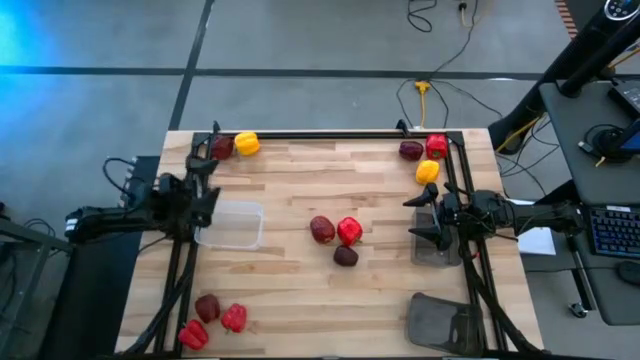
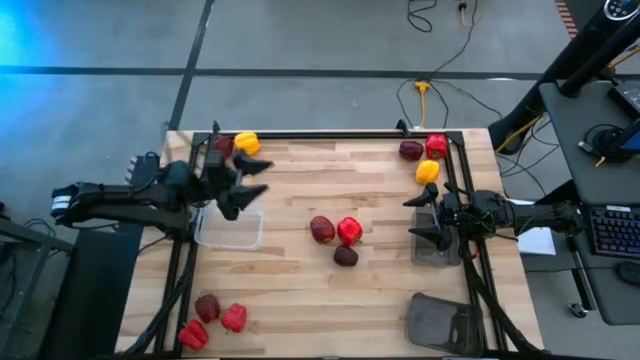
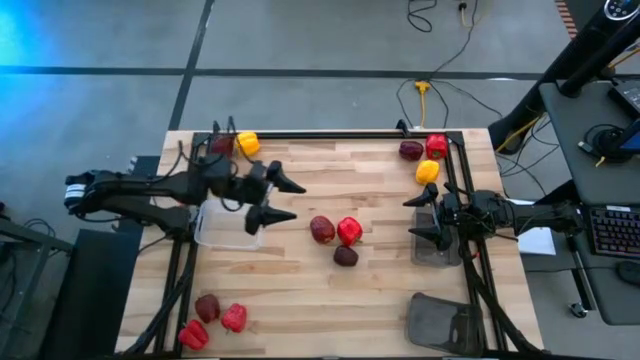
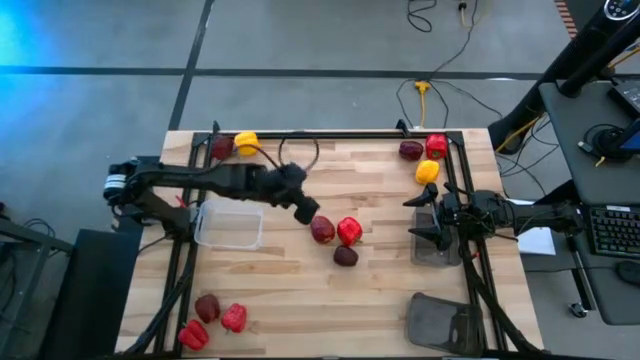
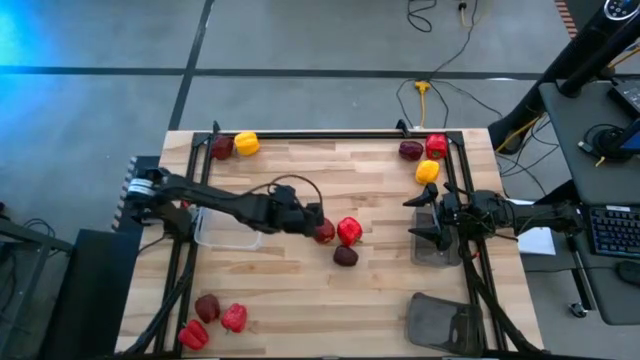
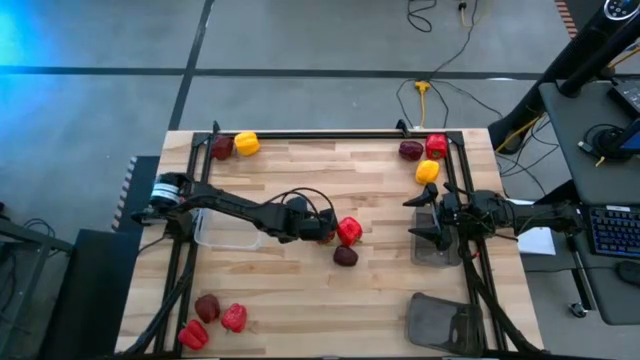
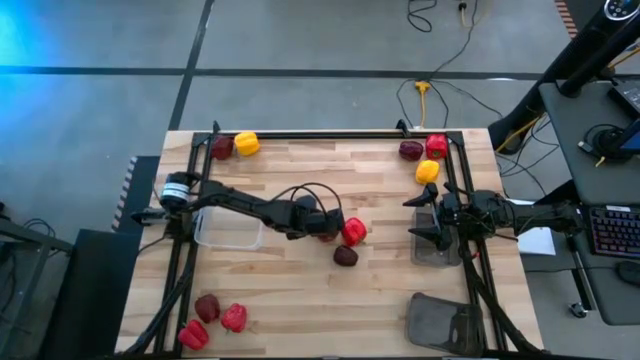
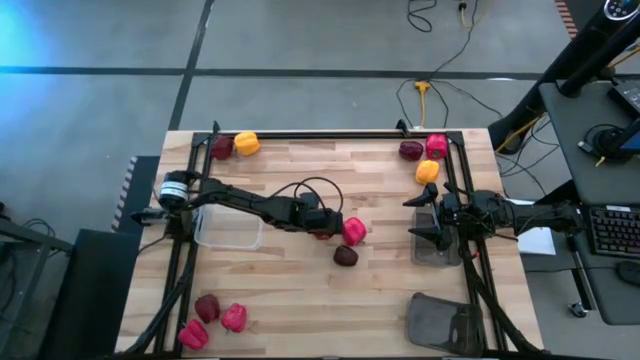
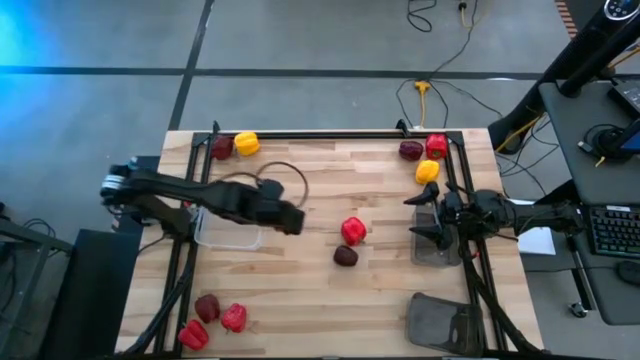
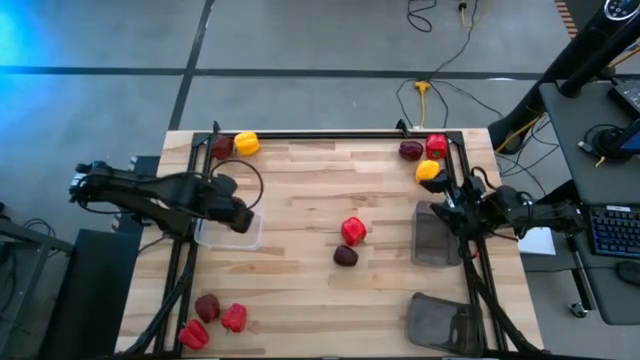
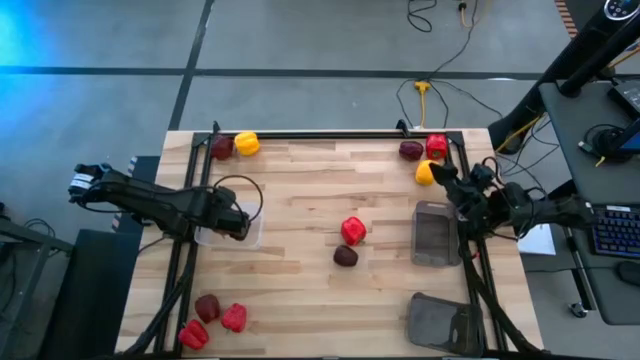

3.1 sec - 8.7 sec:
Task: Sort produce into baskets
Put the center red apple in the transparent bin

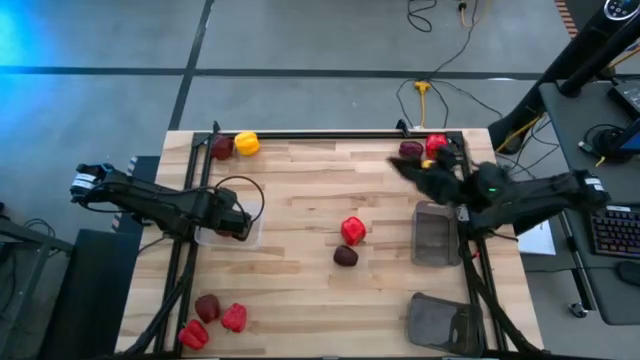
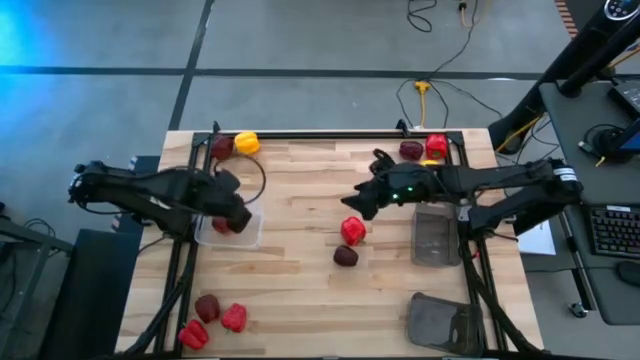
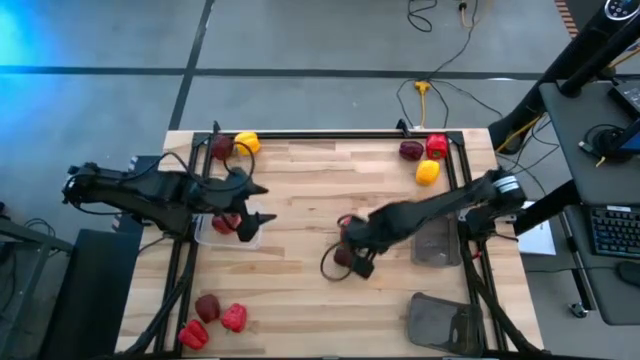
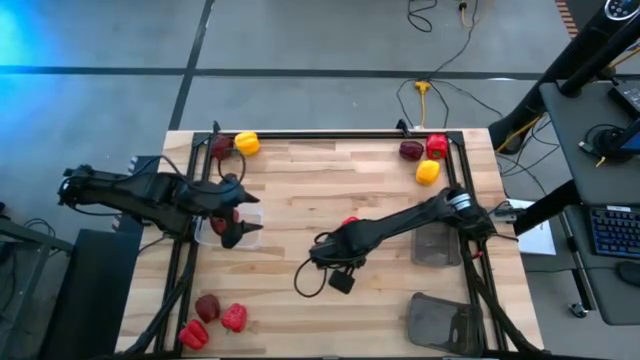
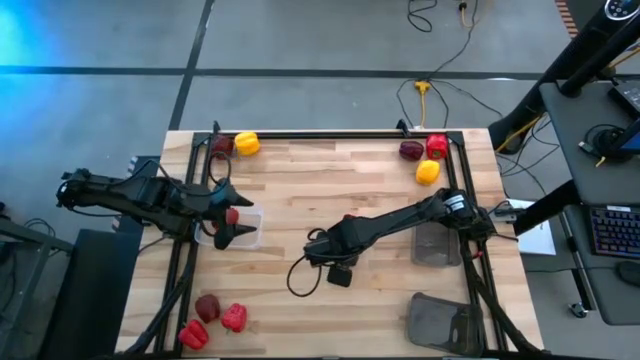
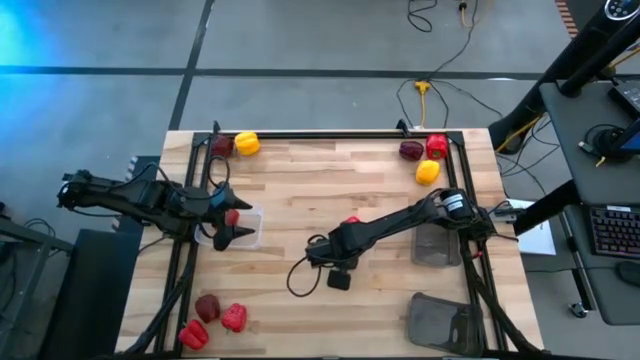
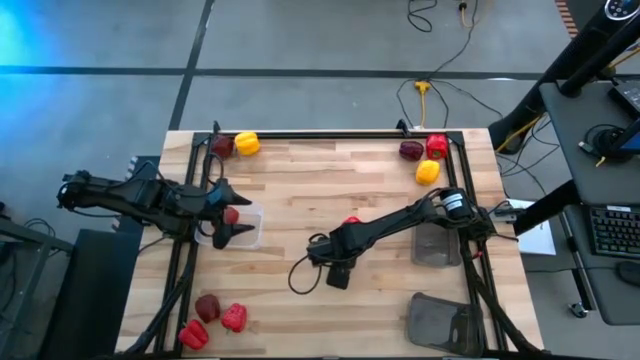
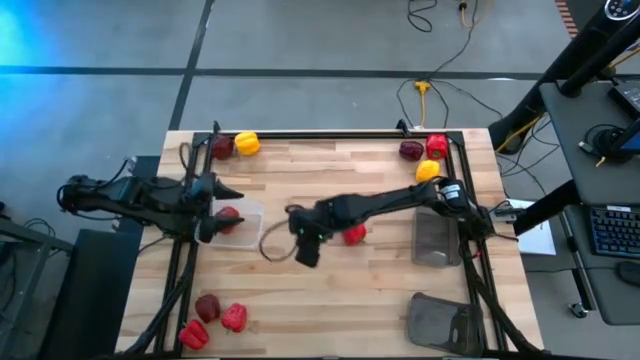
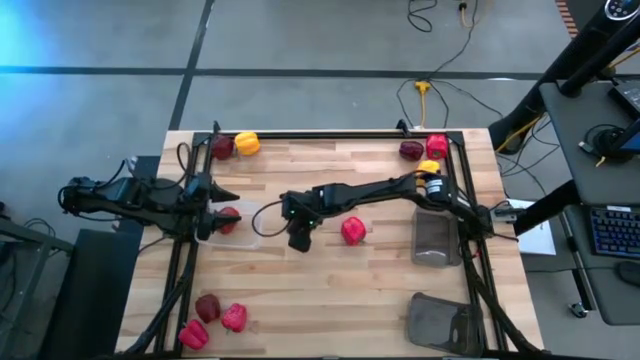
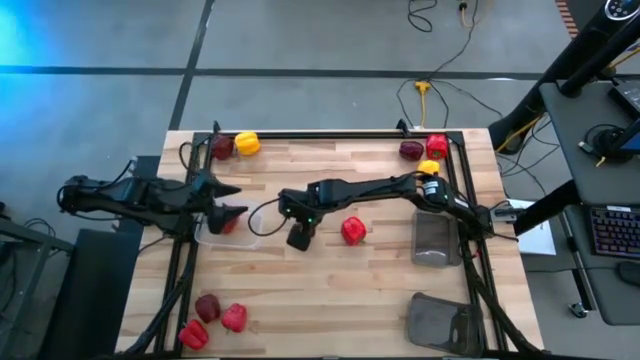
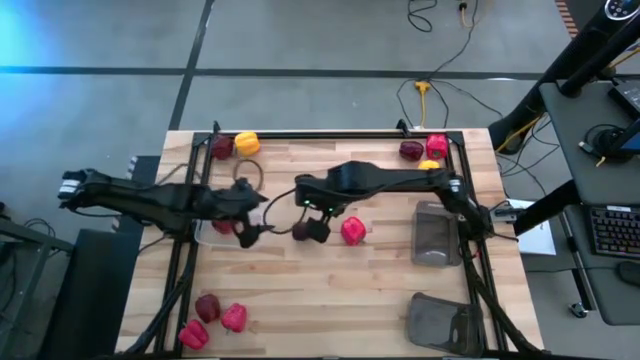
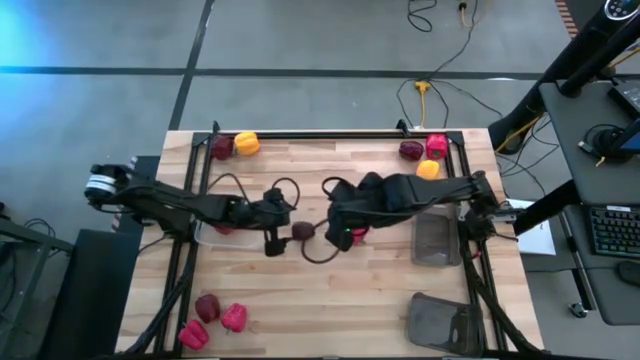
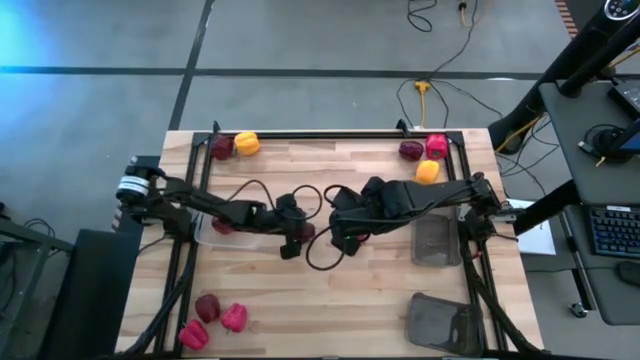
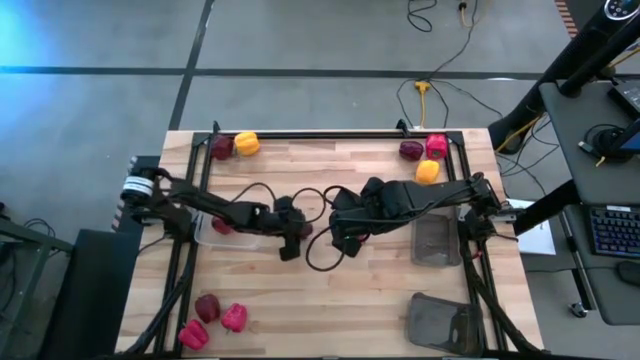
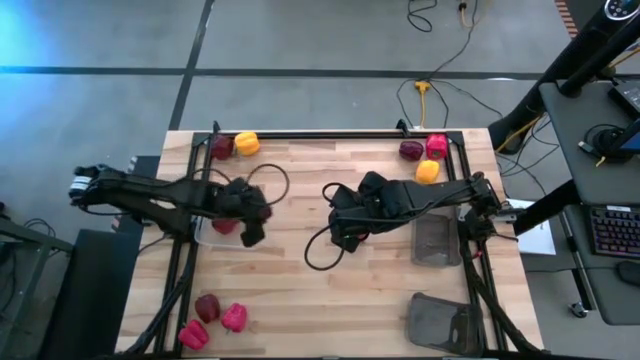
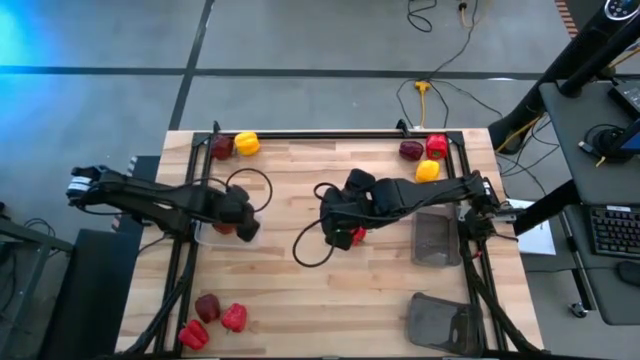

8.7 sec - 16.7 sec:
Put the center red apple in the transparent bin

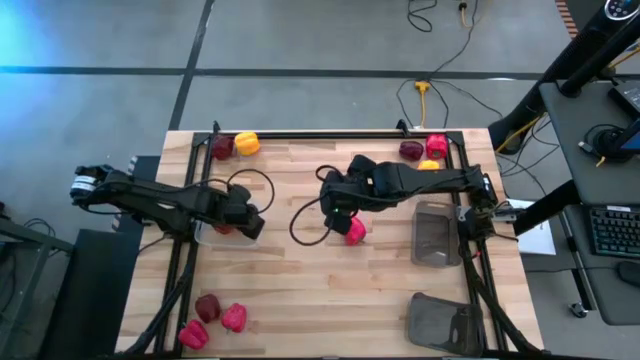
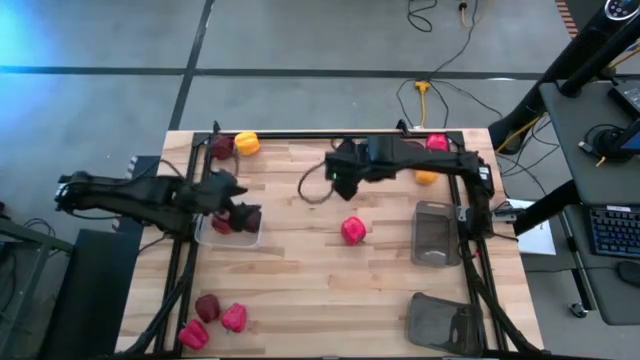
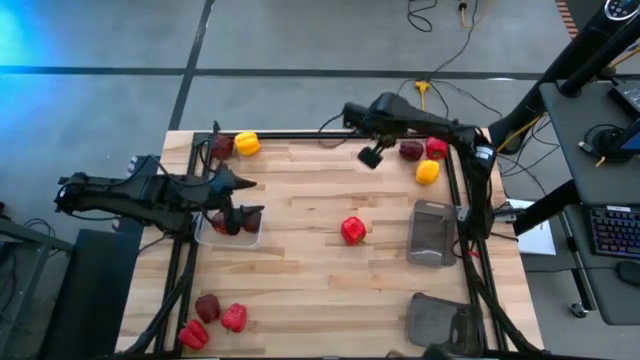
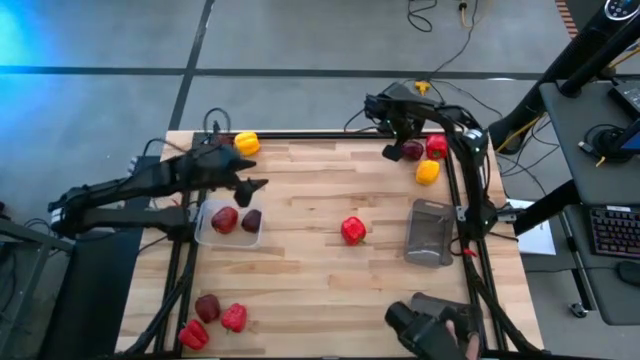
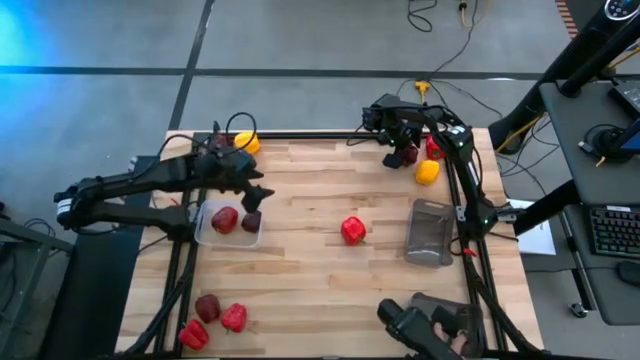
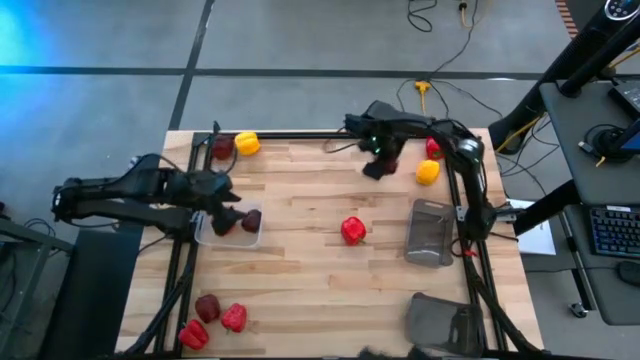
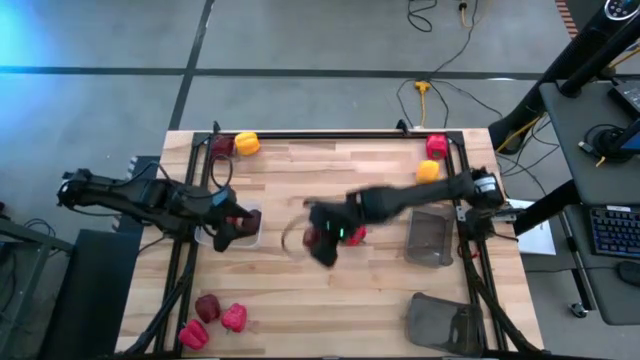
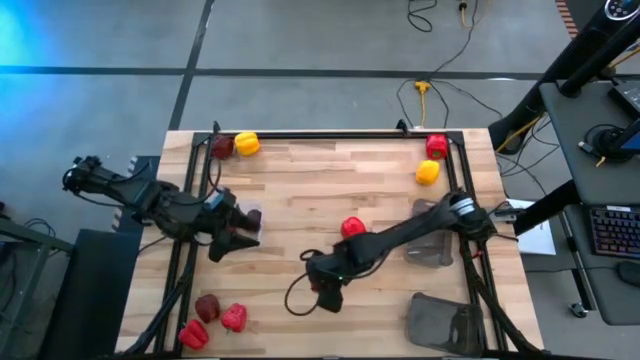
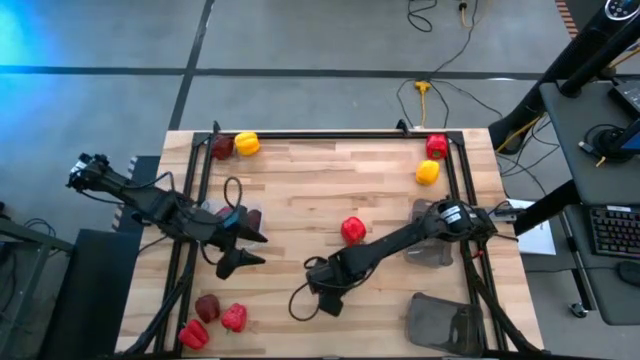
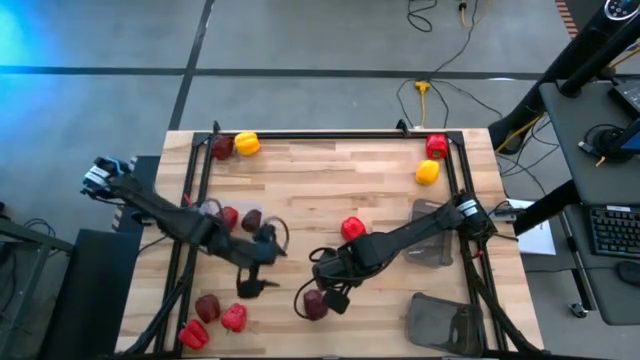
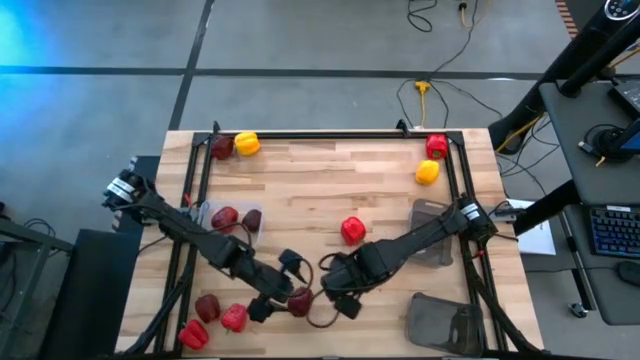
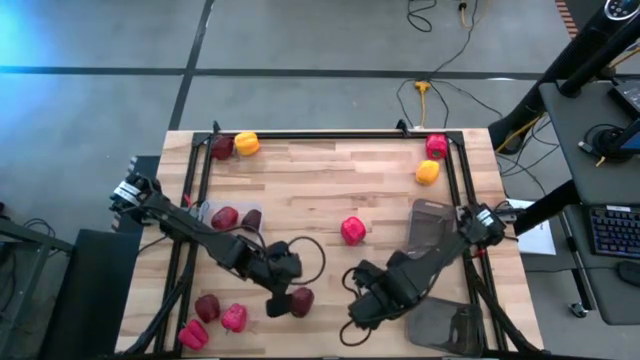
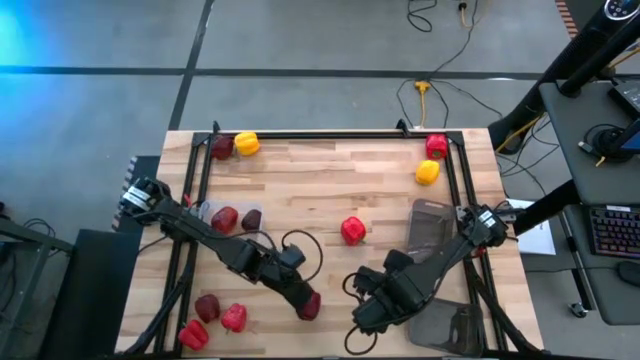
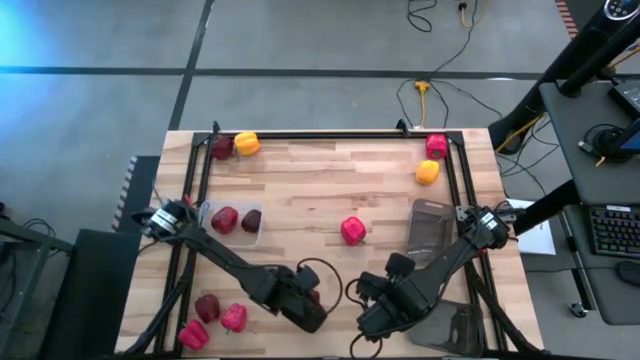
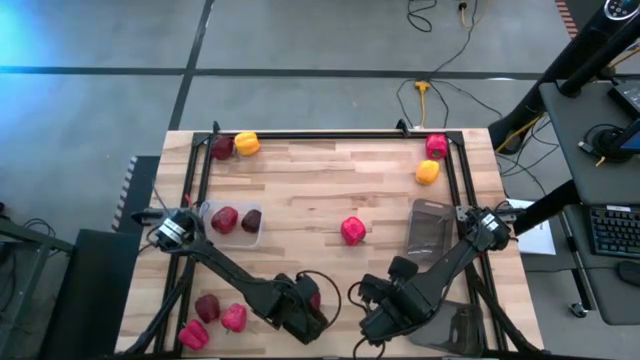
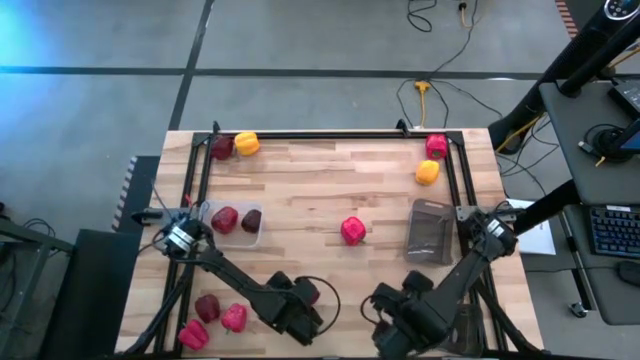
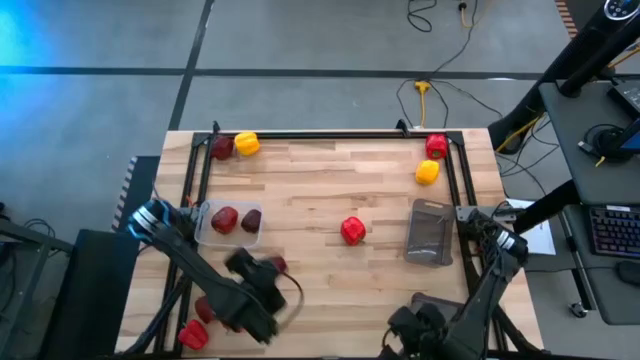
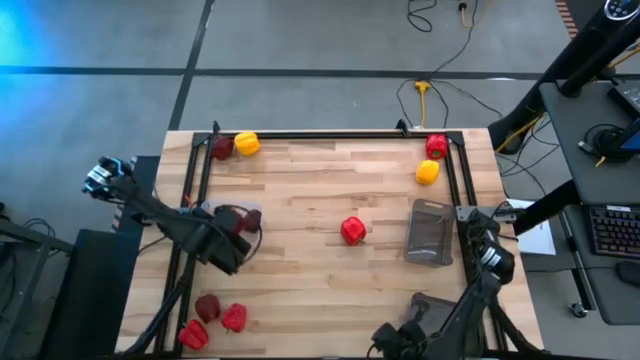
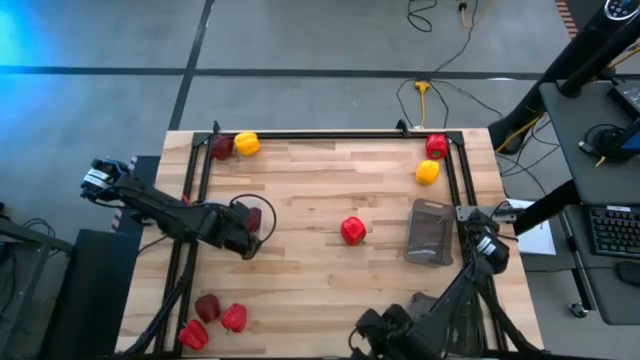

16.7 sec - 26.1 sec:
Put the top right red apple in the transparent bin
